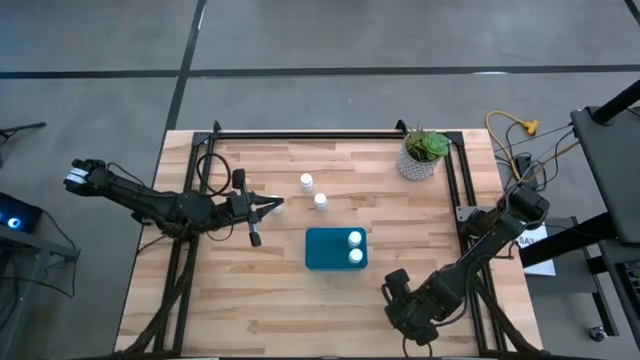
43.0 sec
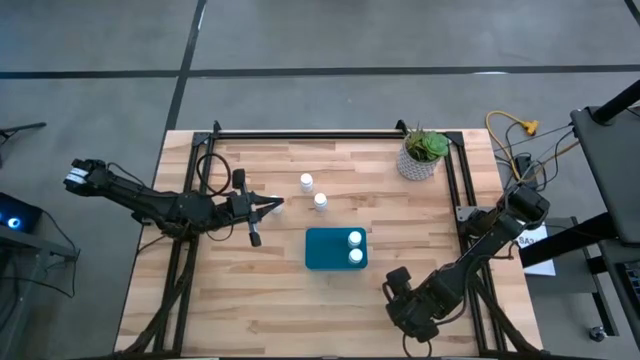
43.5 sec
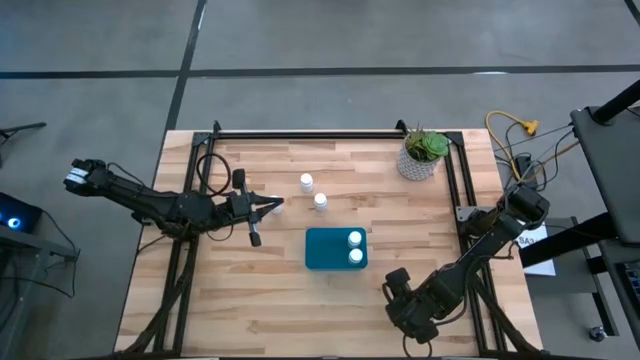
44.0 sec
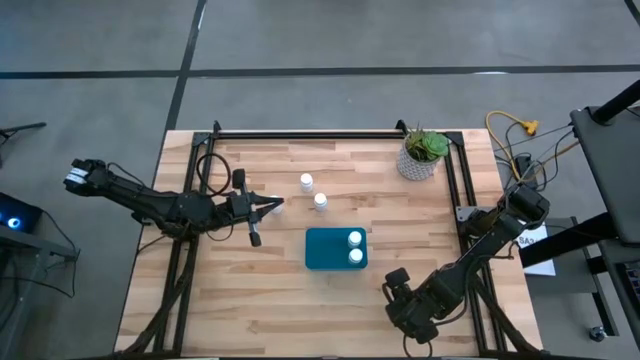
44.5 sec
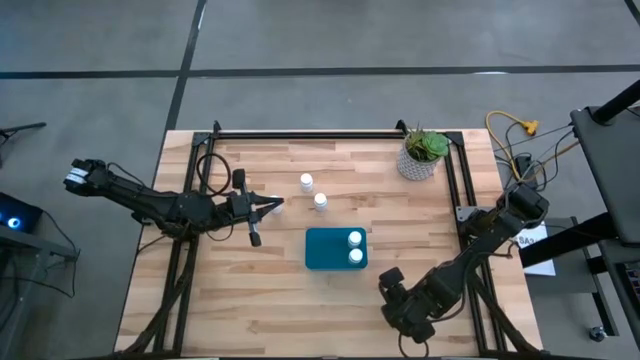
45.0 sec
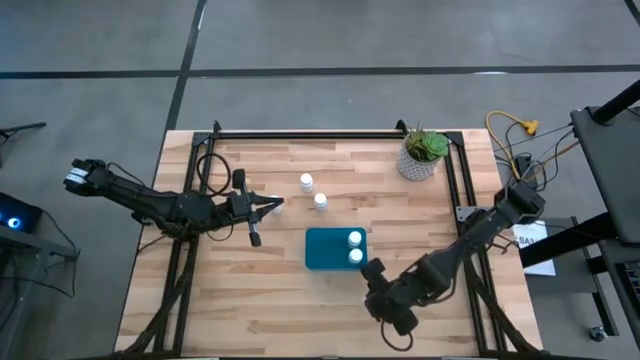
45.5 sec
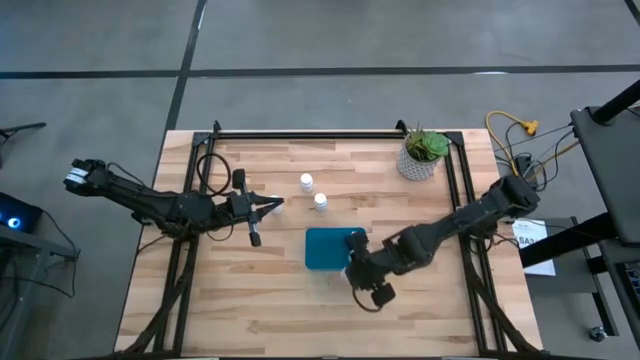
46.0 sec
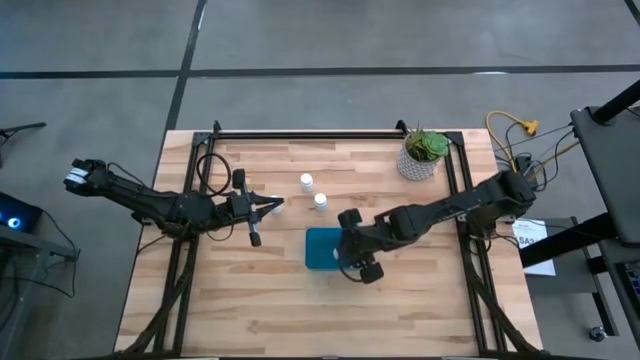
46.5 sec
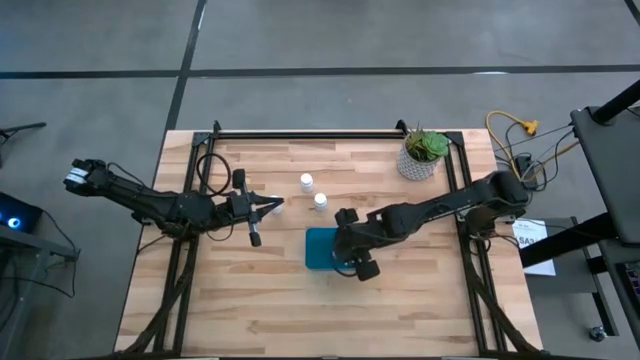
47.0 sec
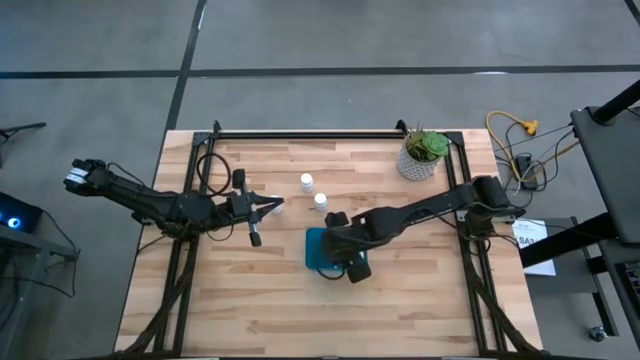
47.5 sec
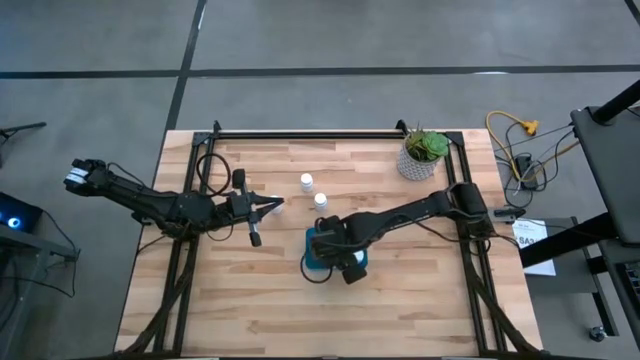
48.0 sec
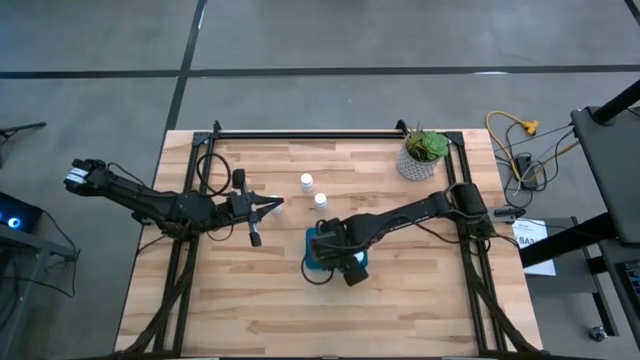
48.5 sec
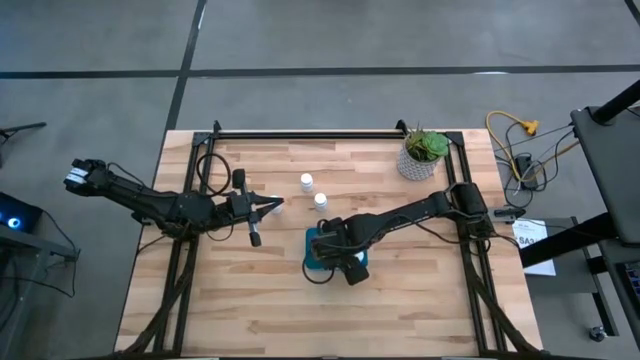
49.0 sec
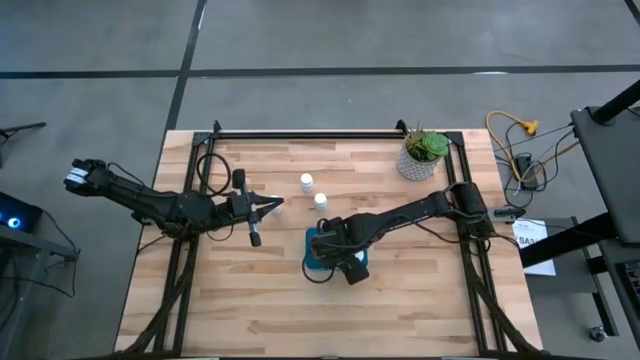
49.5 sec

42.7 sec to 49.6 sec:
Task: Pick and place pill bottles into a basket
Put the white pill bottle into the blue bin

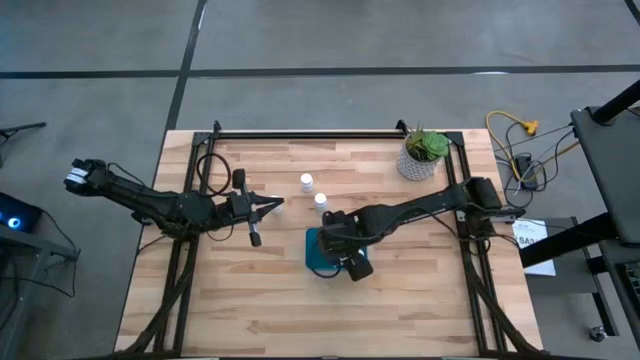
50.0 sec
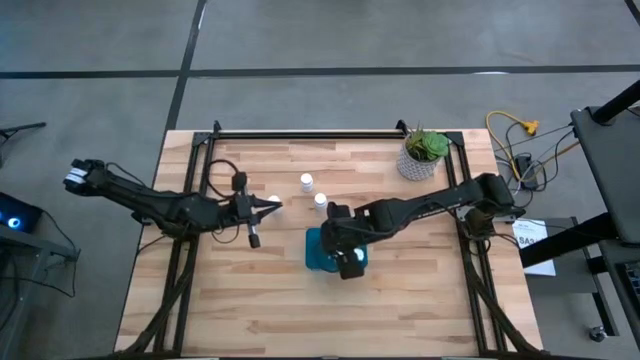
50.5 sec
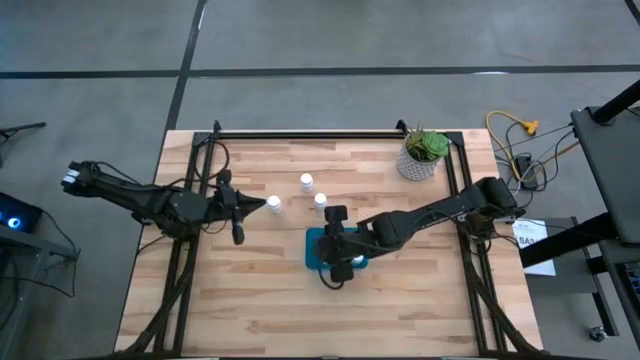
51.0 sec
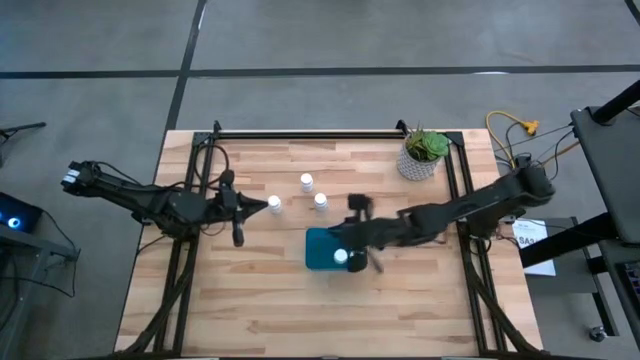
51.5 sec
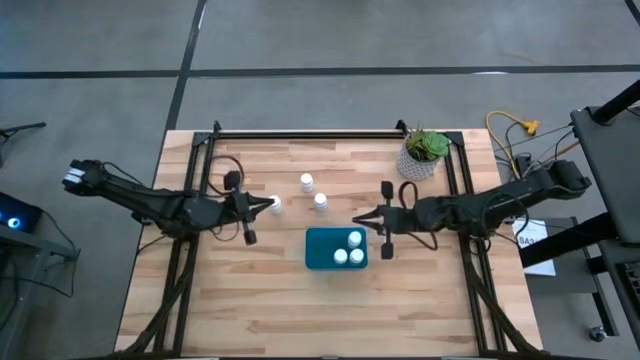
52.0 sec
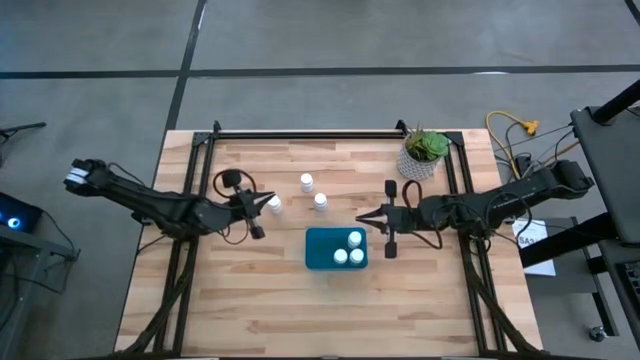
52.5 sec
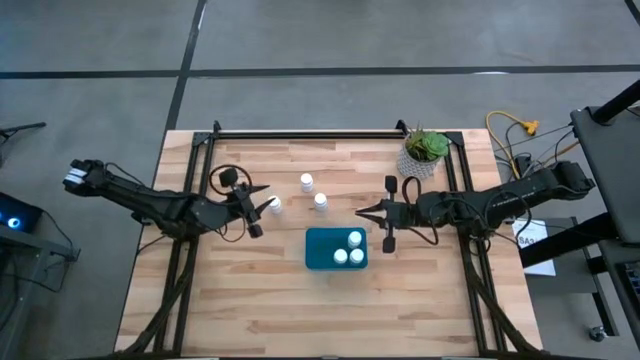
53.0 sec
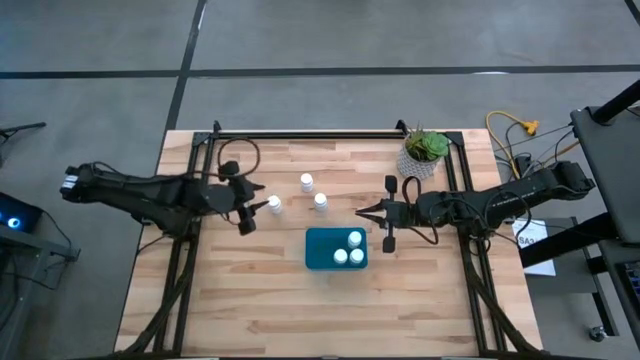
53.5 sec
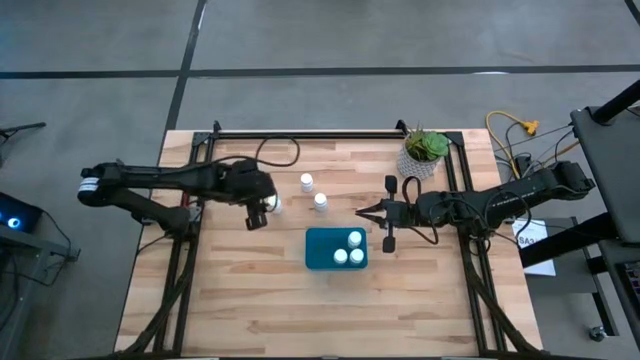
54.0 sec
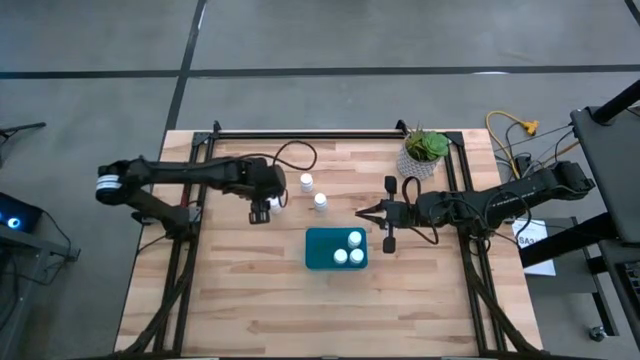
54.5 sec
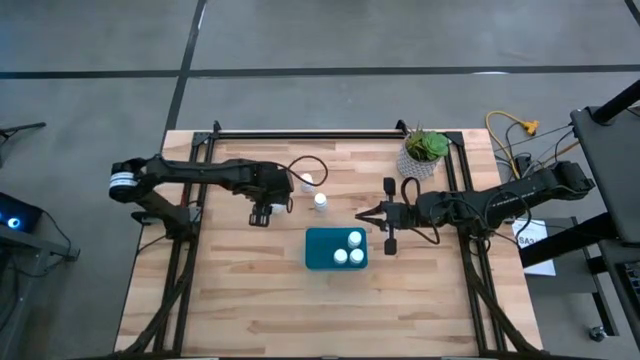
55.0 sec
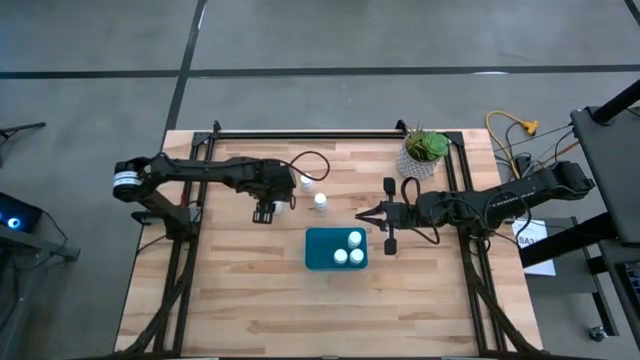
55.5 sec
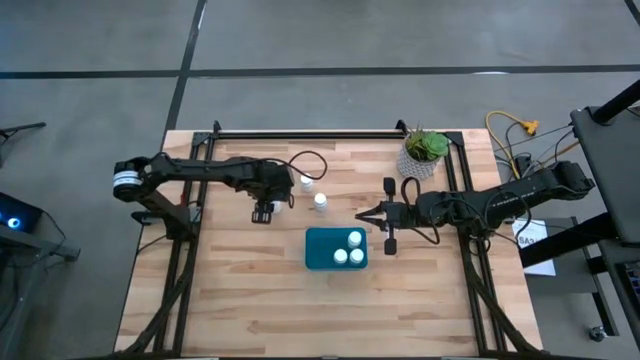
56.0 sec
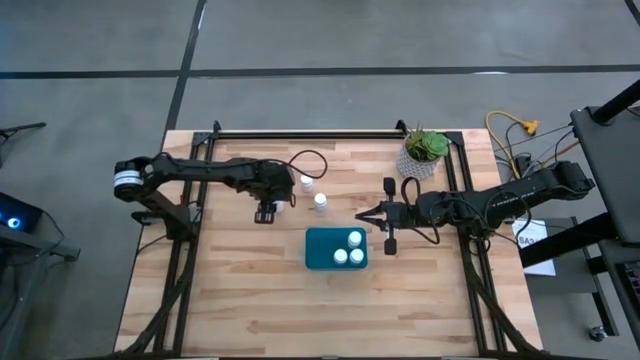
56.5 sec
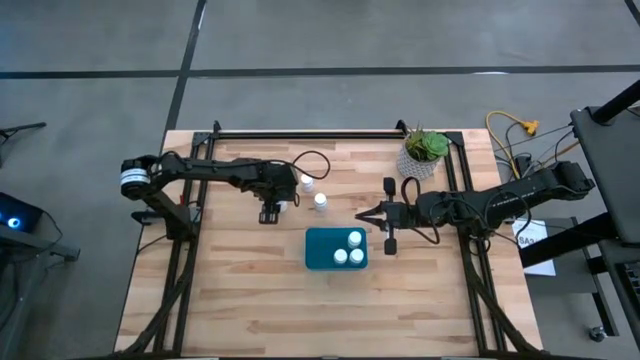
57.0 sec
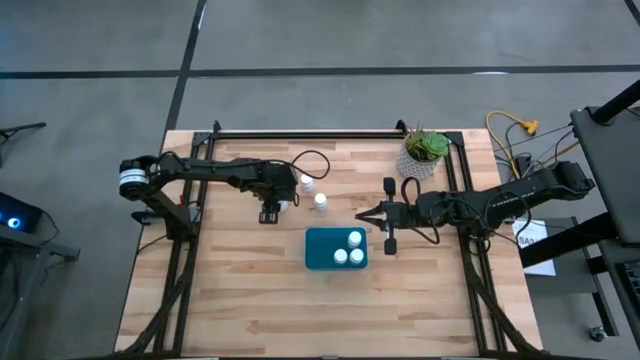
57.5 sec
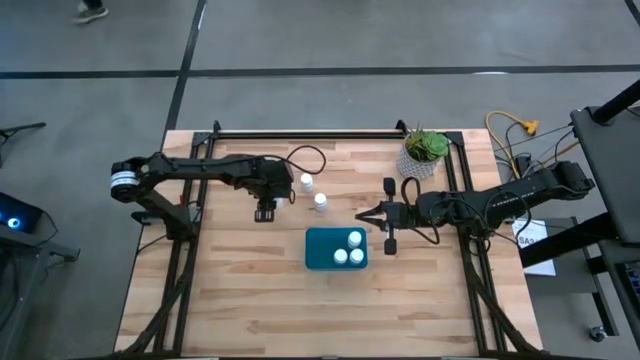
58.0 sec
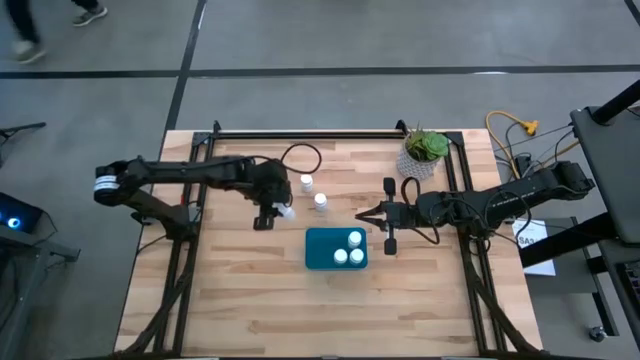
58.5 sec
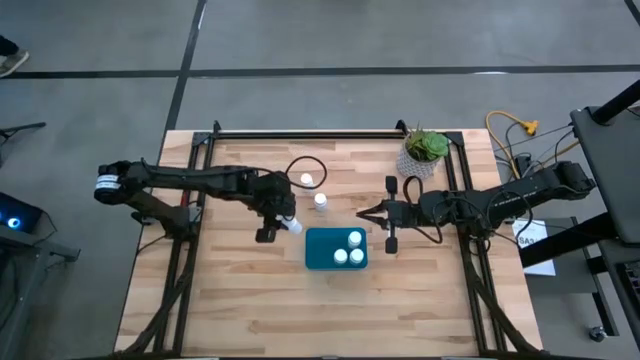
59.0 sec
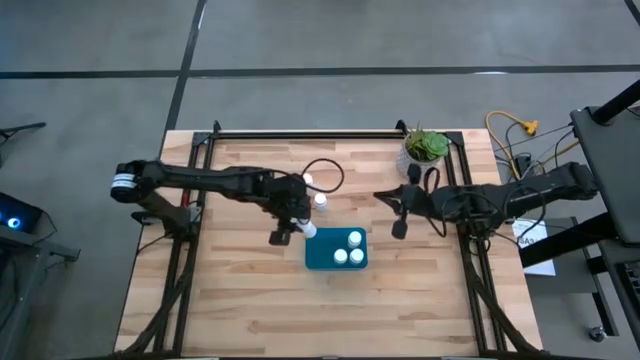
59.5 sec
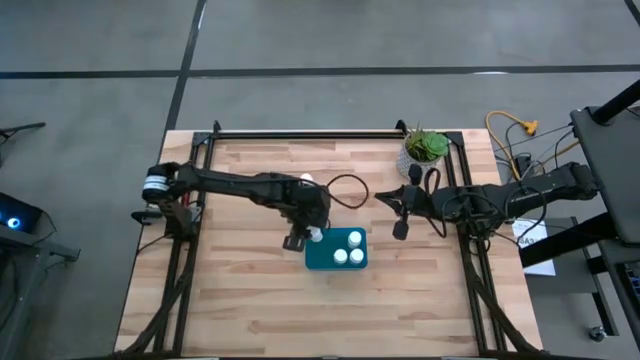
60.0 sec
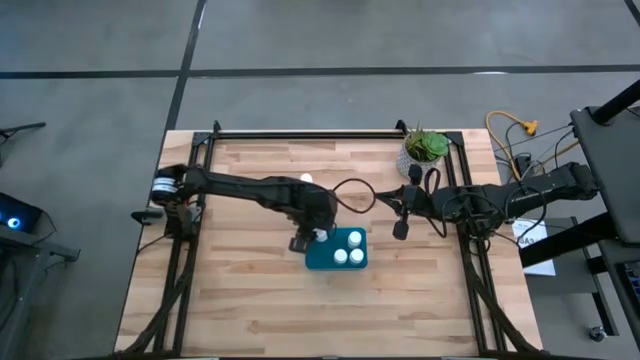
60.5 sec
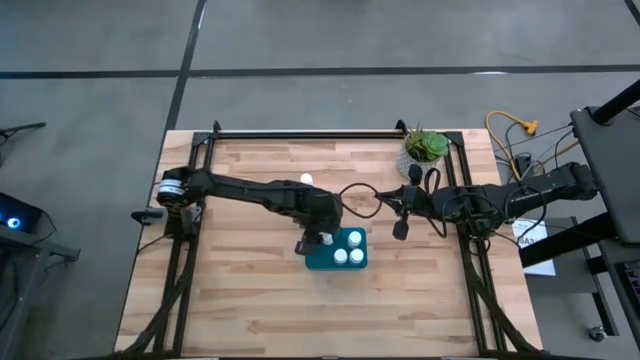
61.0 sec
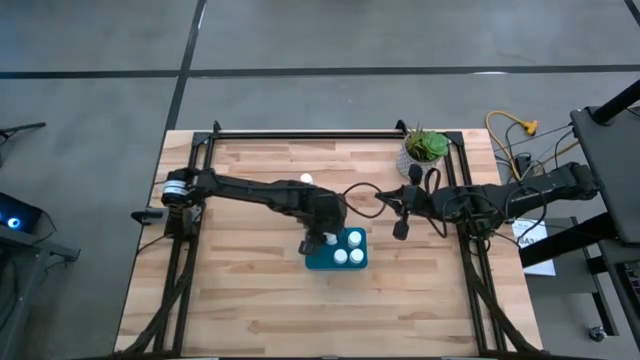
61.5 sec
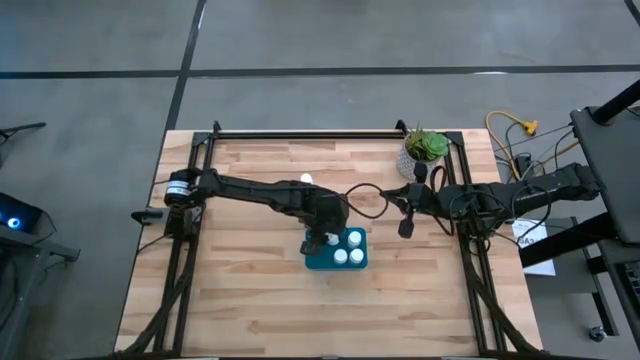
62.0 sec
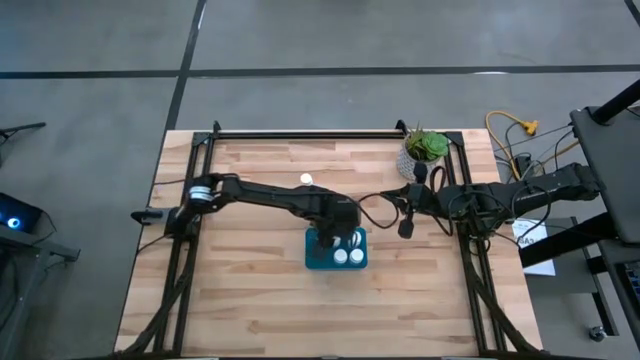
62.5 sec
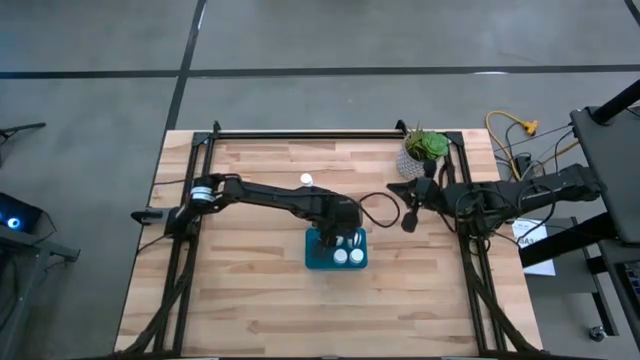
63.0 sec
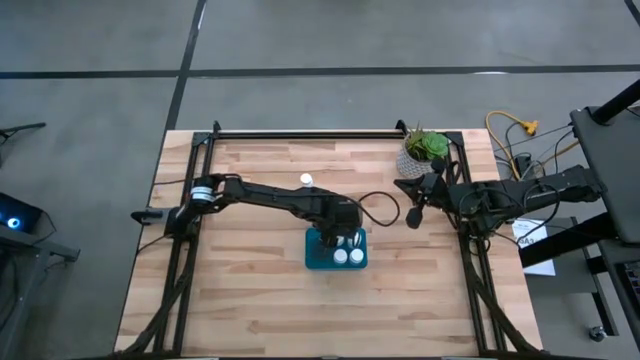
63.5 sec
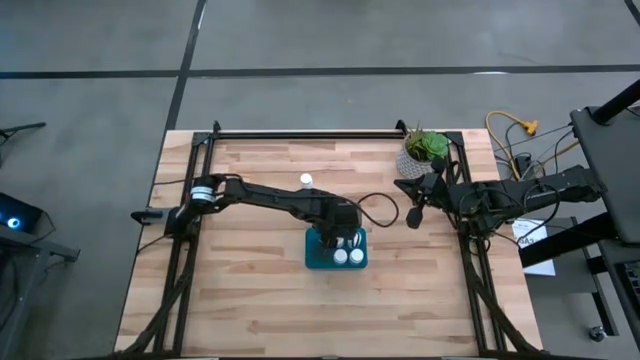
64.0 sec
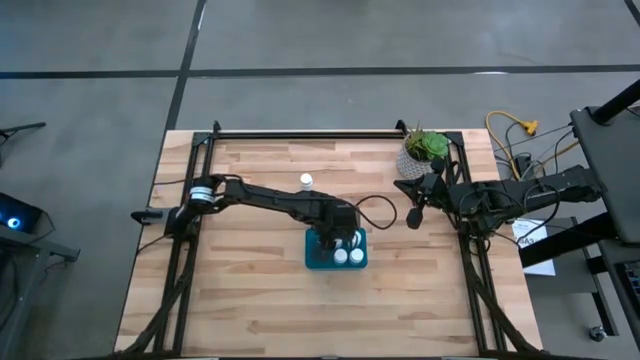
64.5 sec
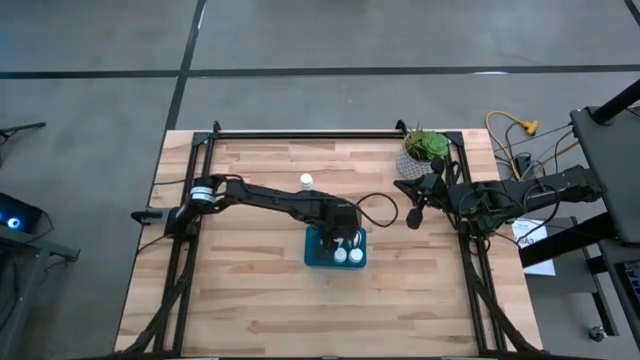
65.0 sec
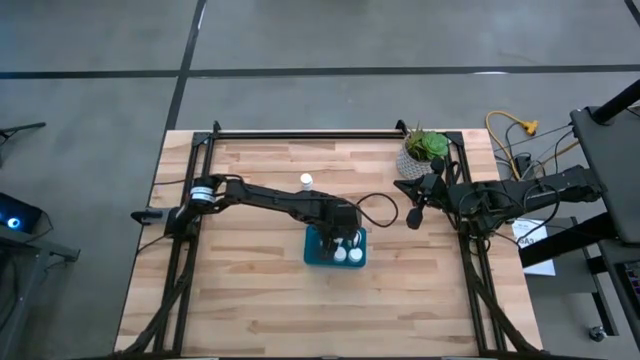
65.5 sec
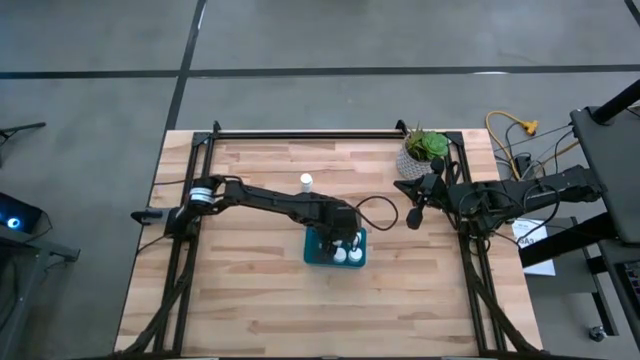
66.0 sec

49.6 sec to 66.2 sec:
Put the white pill bottle into the blue bin
